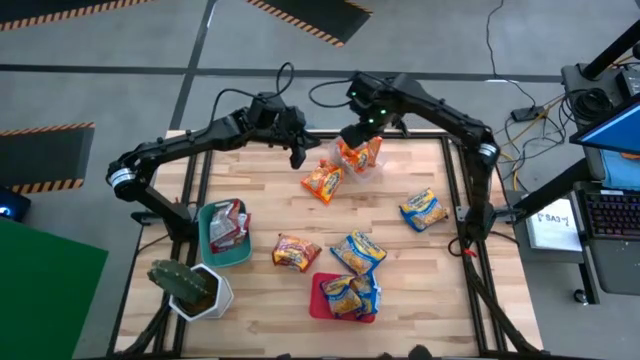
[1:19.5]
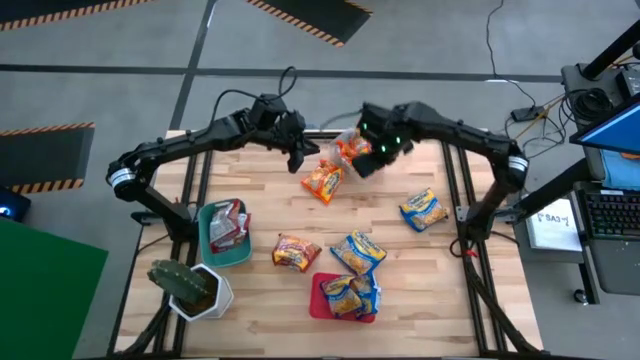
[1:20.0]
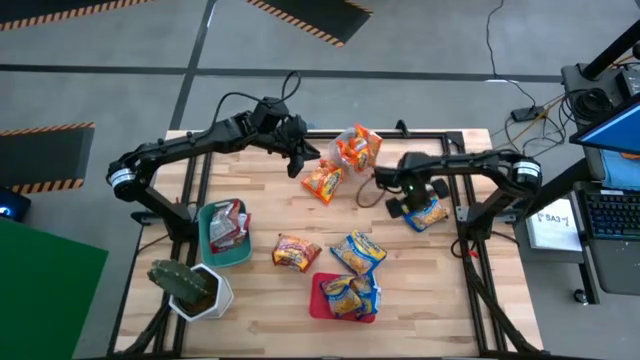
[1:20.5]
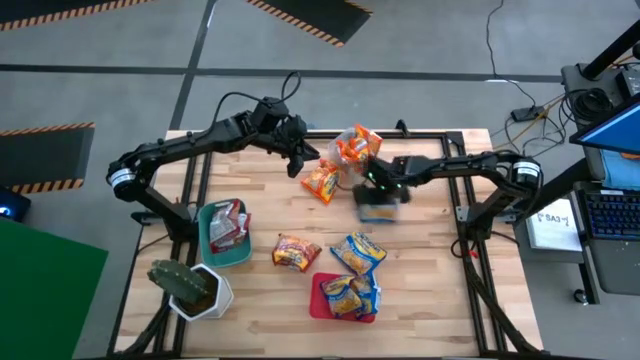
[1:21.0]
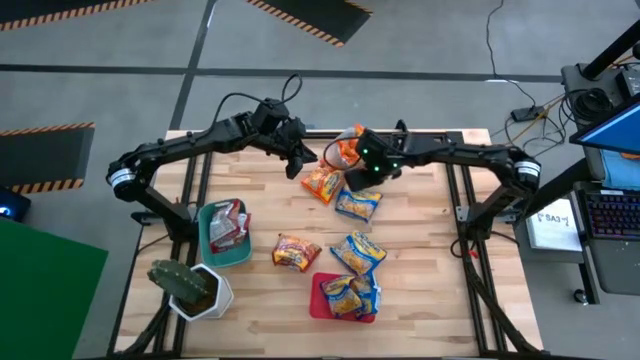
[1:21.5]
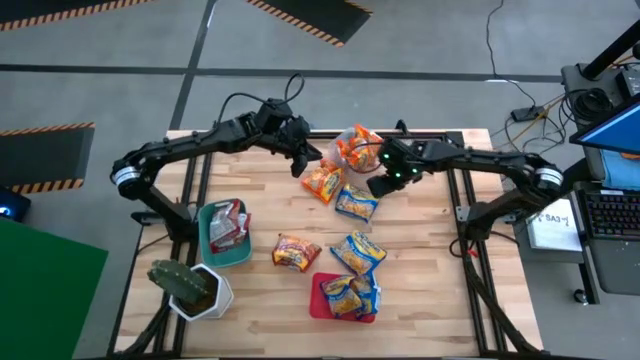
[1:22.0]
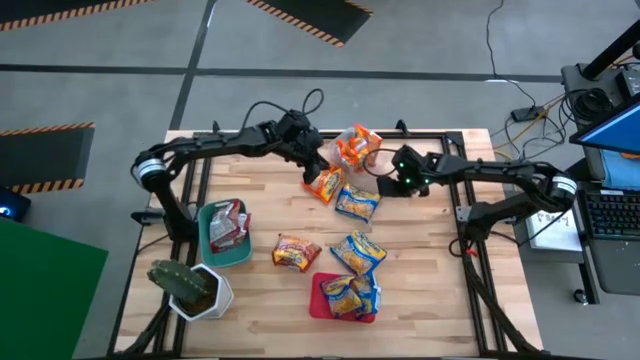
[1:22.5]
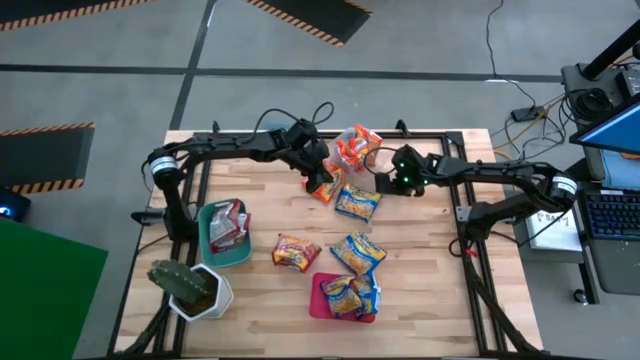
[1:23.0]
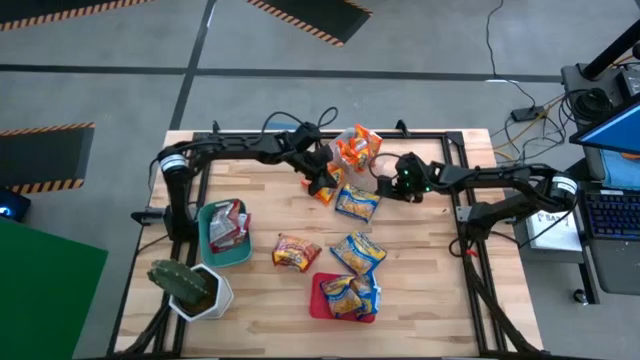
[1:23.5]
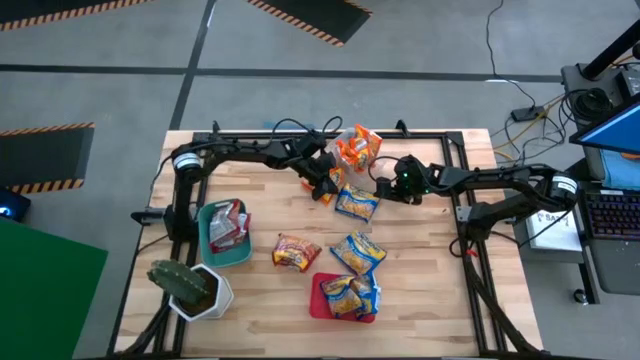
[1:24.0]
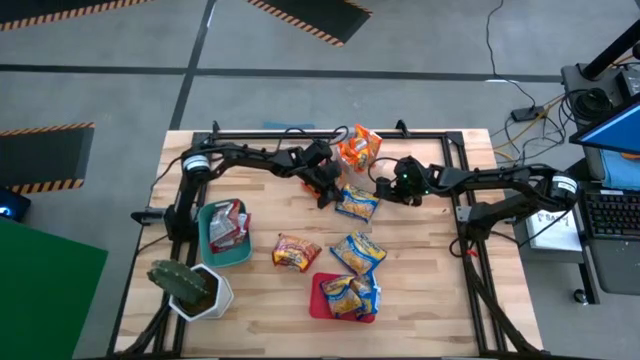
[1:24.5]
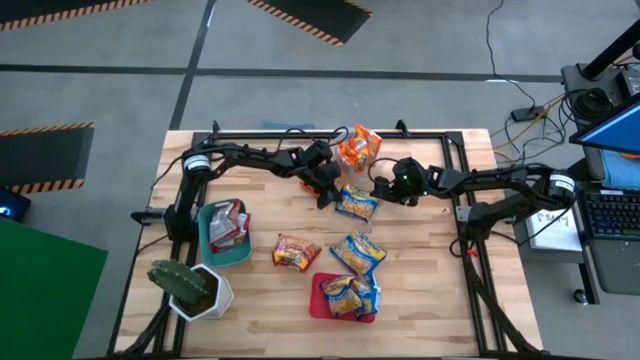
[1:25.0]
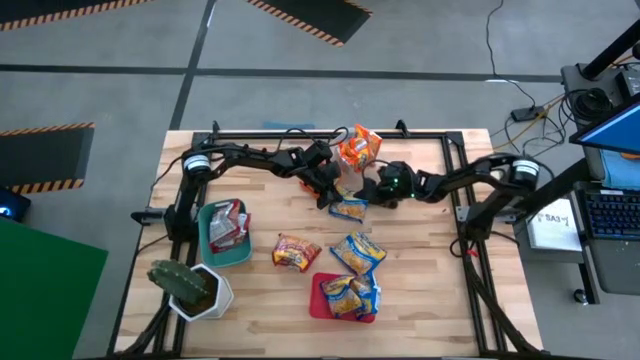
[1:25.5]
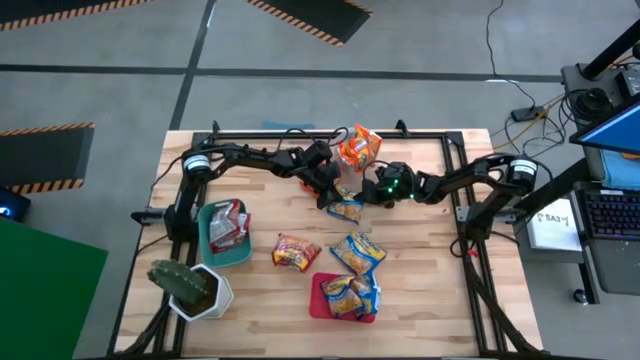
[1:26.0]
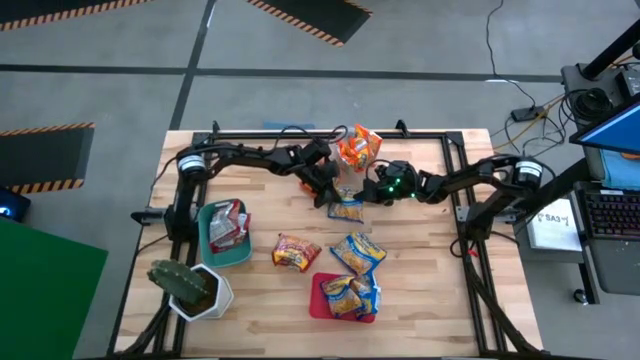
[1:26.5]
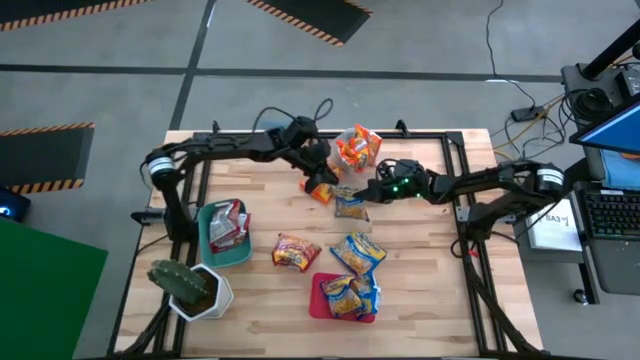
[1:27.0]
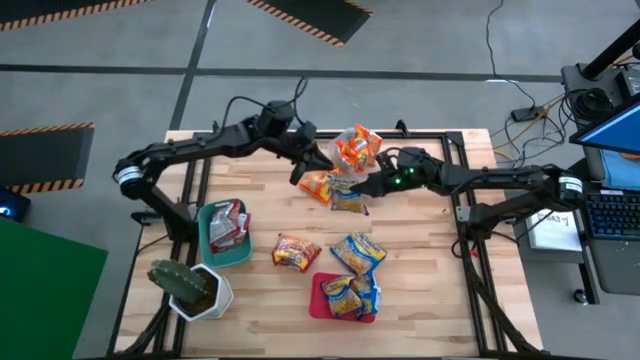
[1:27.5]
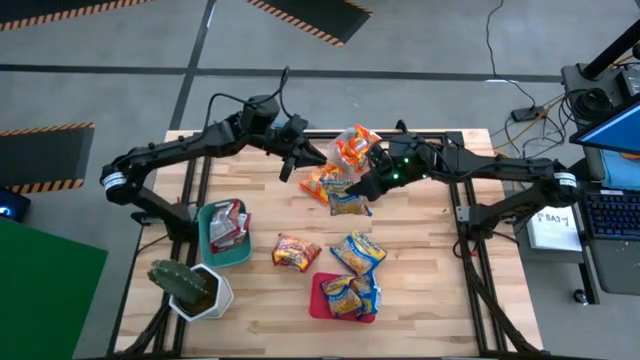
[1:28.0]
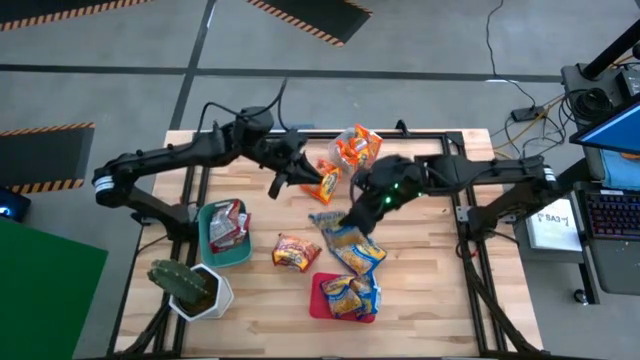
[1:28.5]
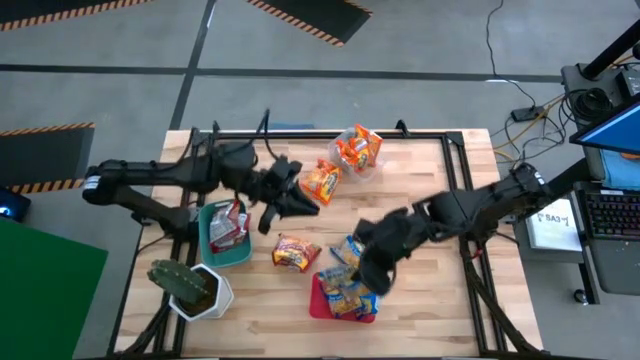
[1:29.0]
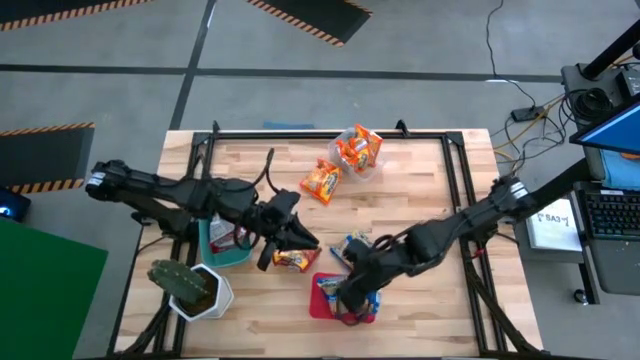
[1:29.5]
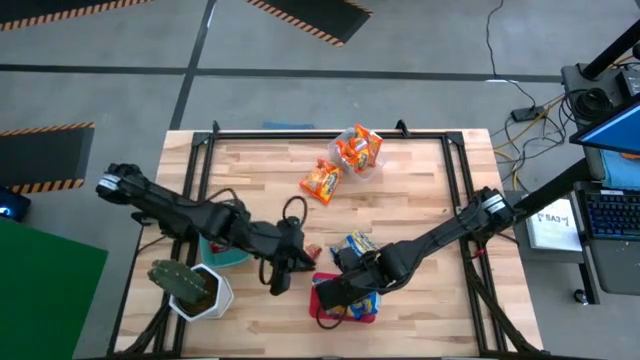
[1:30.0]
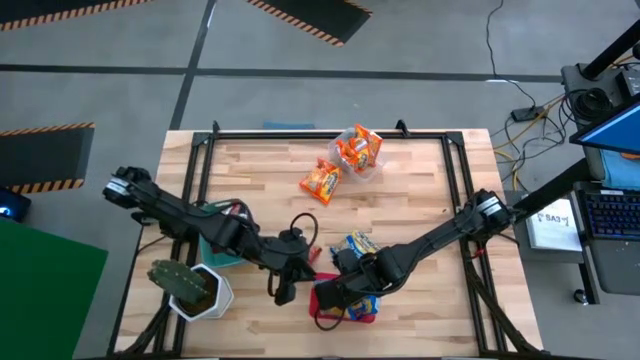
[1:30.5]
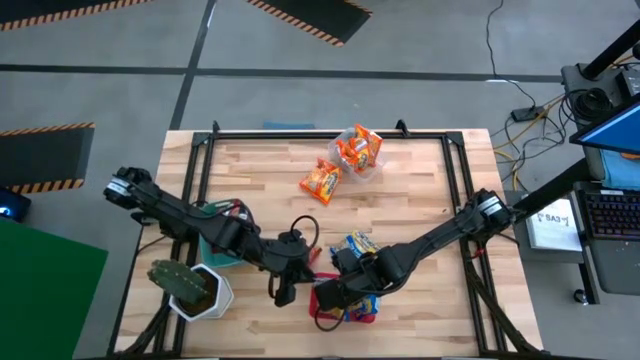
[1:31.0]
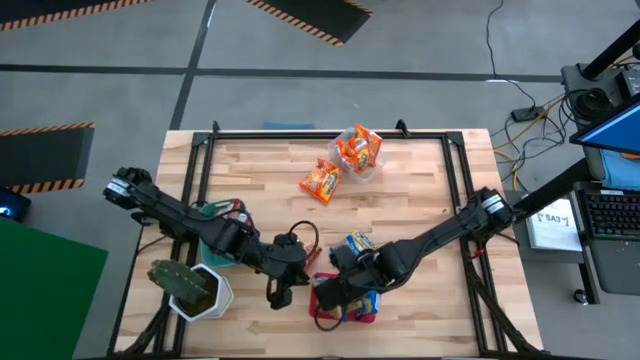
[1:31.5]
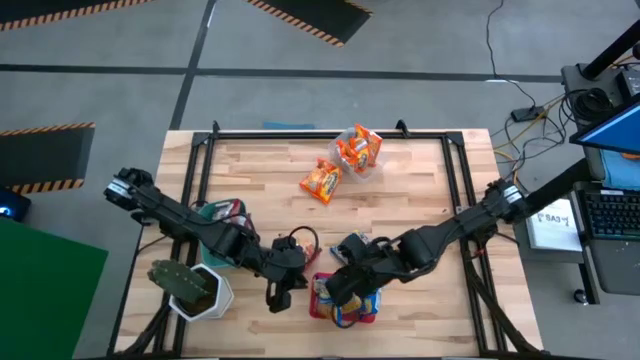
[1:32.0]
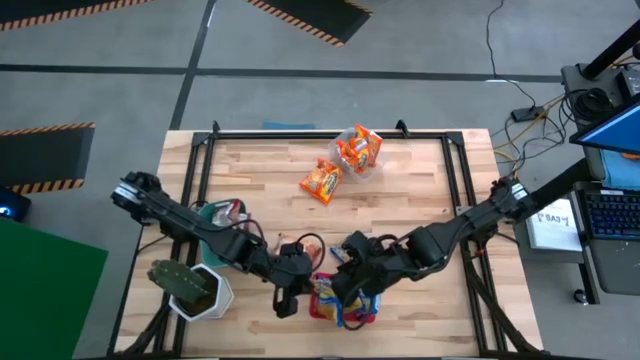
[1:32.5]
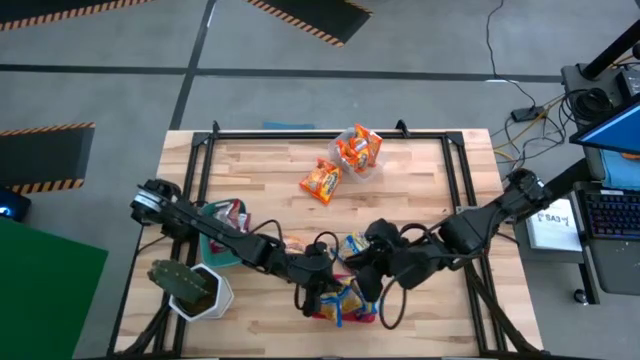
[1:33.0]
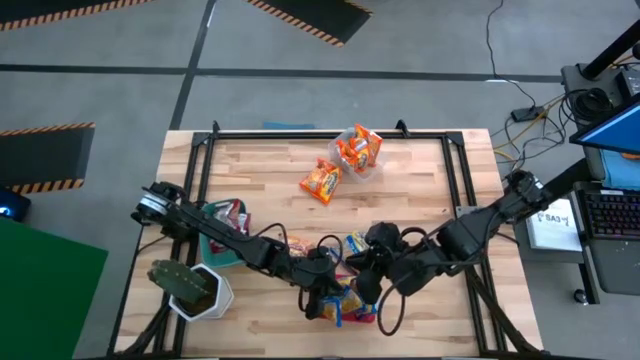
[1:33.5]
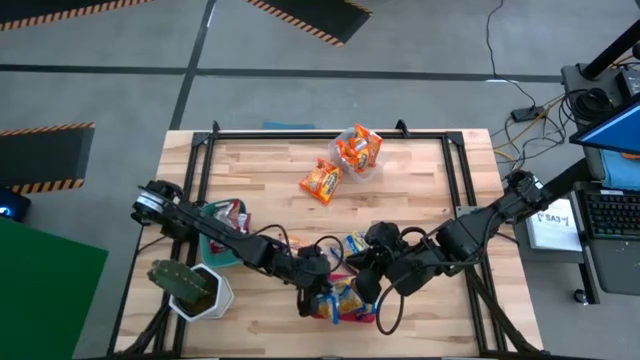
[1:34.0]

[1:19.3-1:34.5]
Task: Sort Maruchan noodles
Put the top blue noodle pack into the red bin

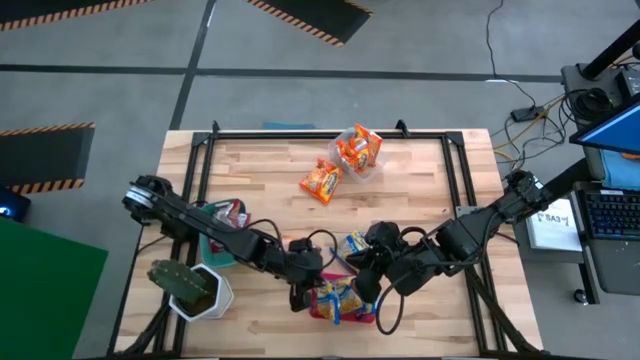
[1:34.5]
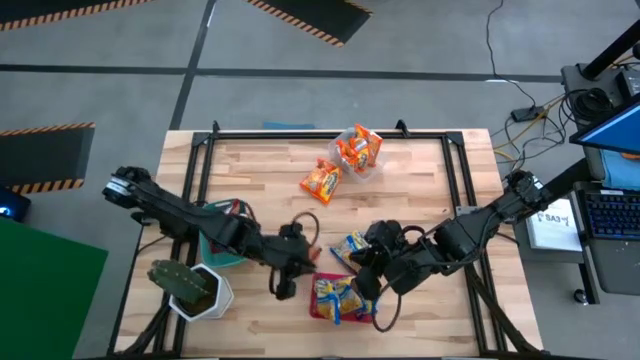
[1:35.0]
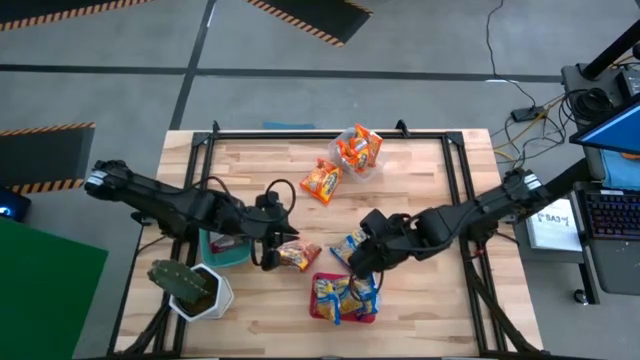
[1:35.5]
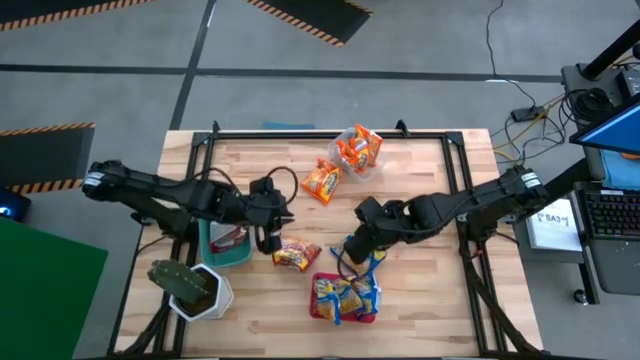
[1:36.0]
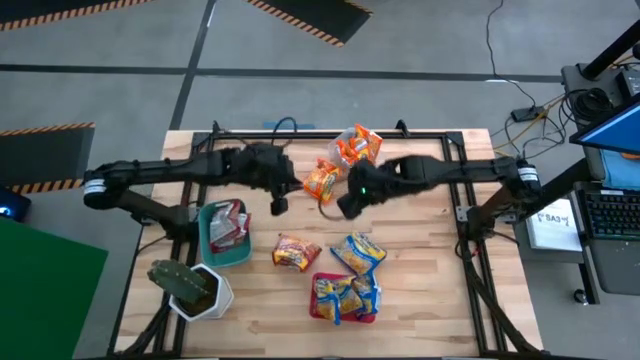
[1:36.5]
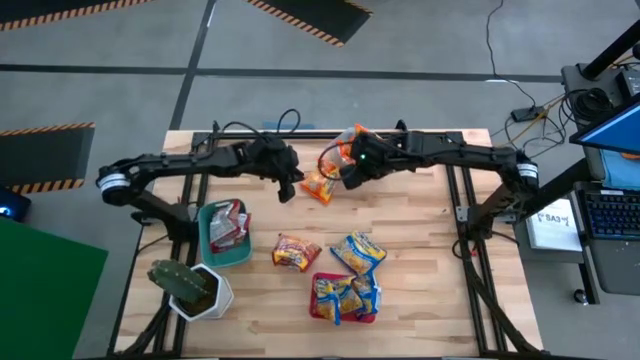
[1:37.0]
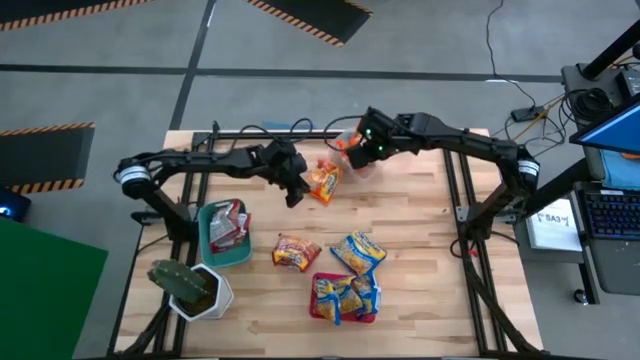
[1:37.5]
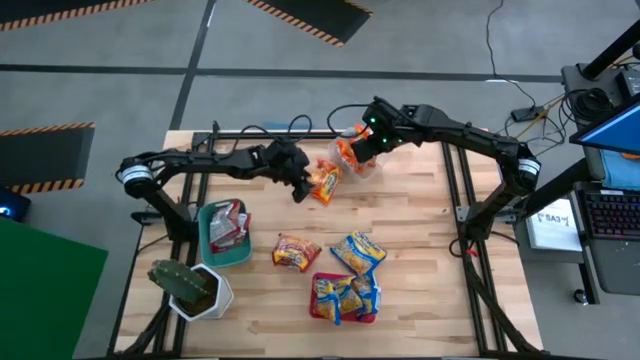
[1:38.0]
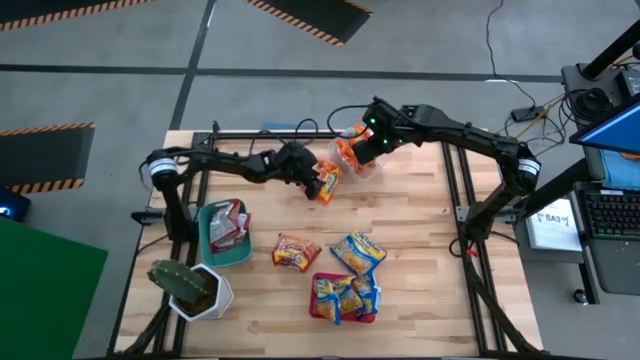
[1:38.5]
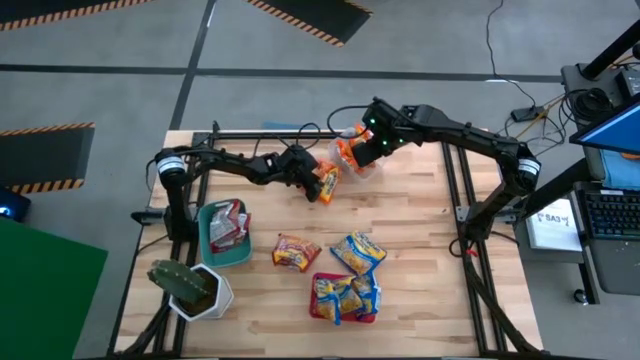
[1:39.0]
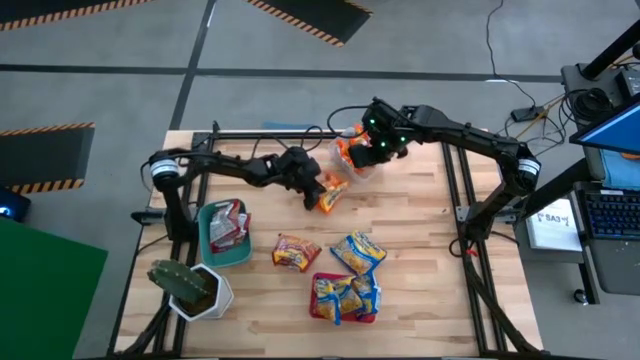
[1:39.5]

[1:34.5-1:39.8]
Put the orange noodle pack into the transparent bin
